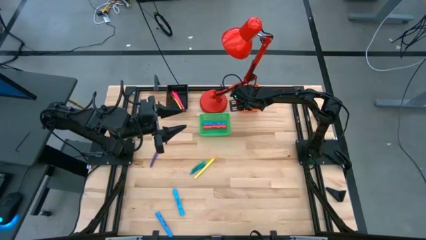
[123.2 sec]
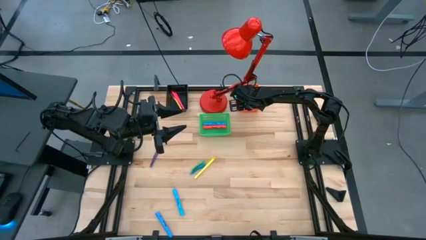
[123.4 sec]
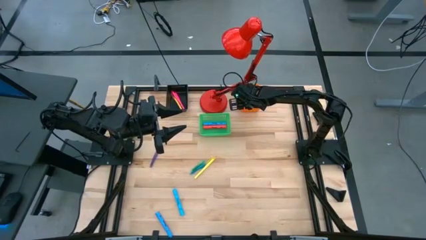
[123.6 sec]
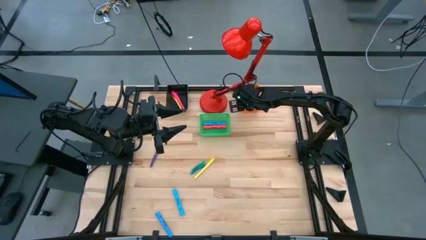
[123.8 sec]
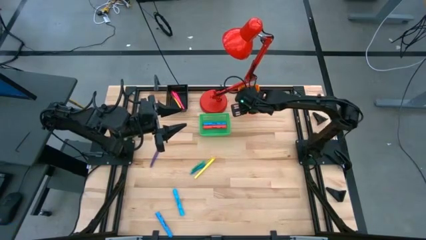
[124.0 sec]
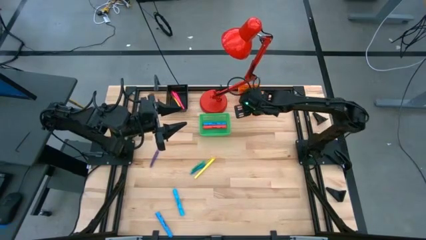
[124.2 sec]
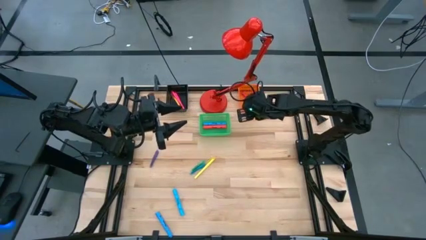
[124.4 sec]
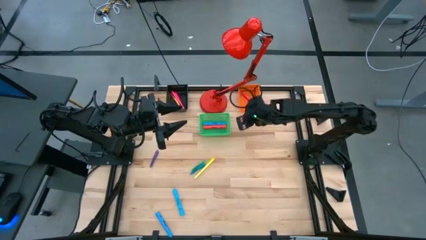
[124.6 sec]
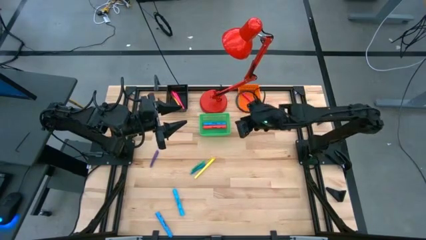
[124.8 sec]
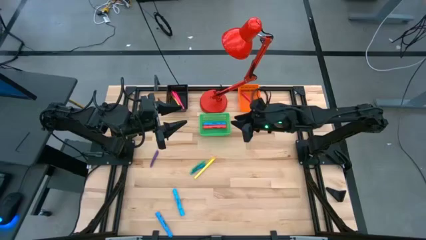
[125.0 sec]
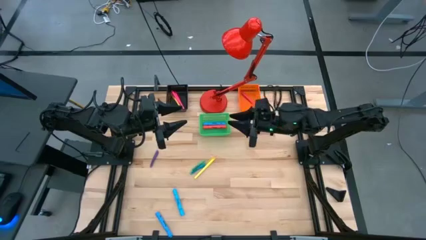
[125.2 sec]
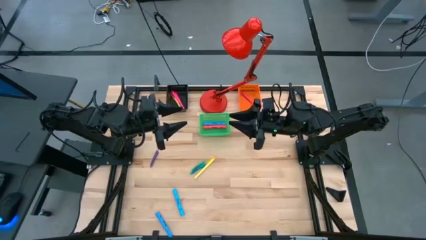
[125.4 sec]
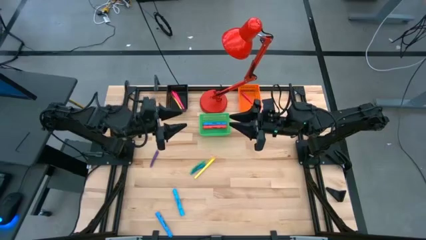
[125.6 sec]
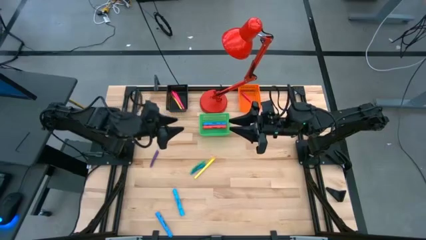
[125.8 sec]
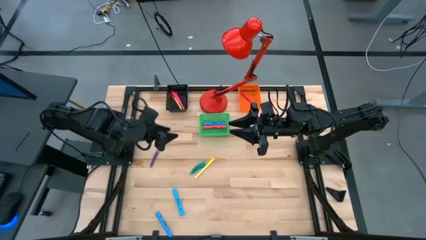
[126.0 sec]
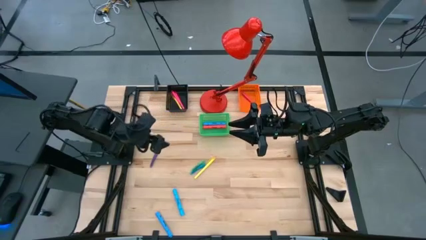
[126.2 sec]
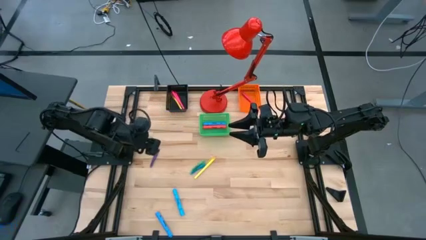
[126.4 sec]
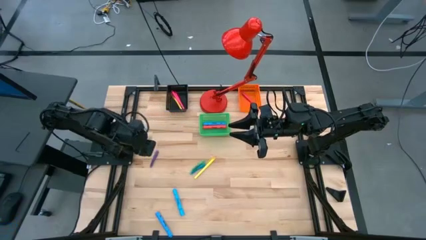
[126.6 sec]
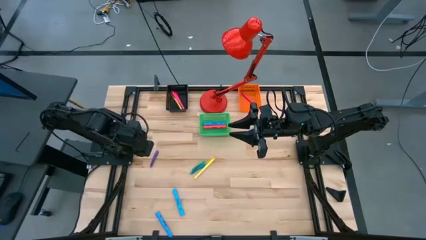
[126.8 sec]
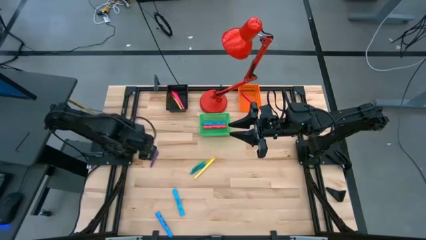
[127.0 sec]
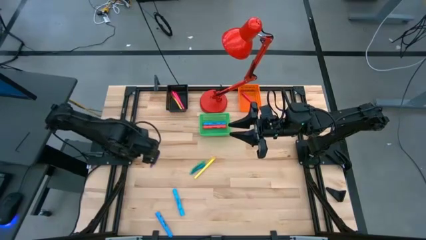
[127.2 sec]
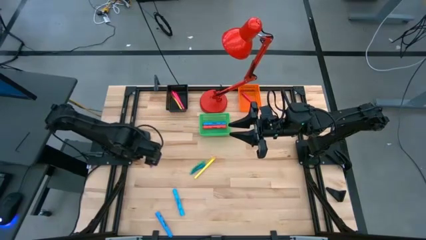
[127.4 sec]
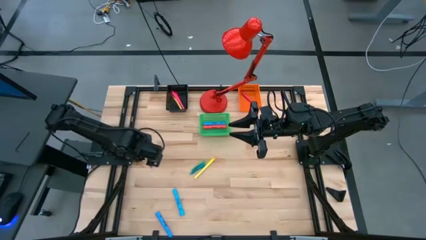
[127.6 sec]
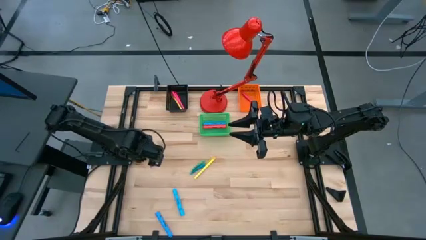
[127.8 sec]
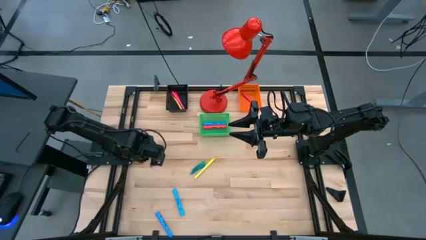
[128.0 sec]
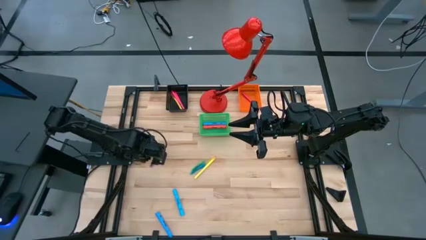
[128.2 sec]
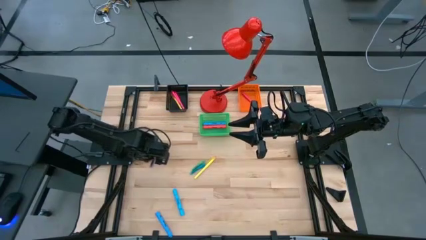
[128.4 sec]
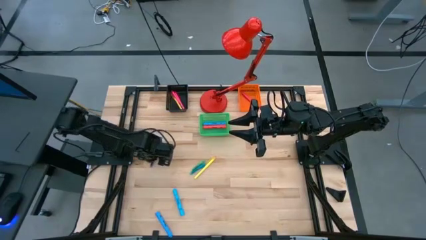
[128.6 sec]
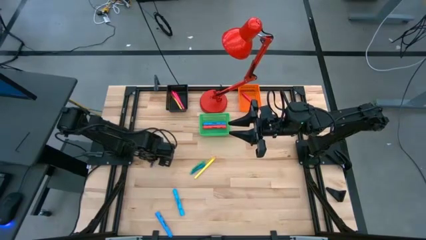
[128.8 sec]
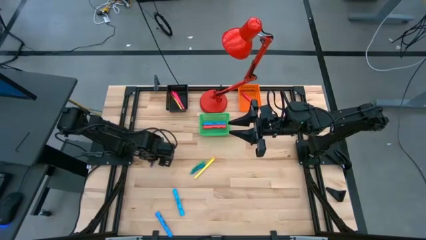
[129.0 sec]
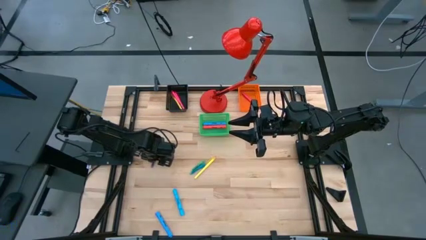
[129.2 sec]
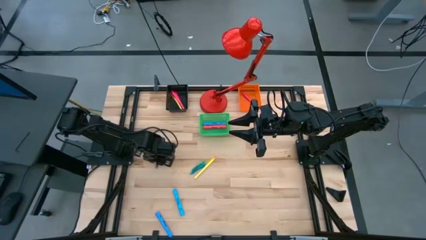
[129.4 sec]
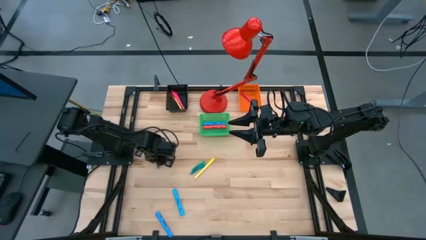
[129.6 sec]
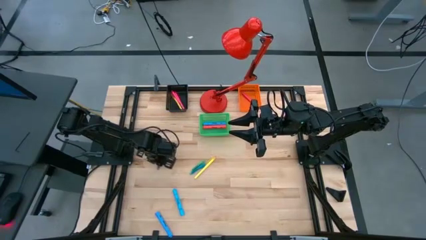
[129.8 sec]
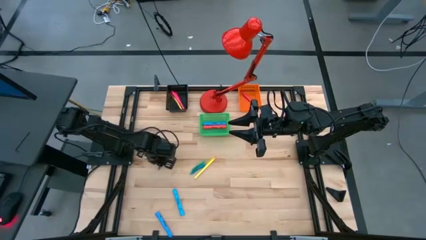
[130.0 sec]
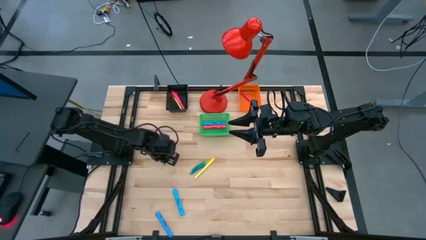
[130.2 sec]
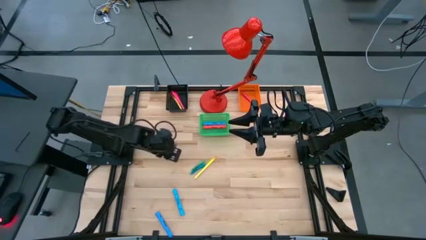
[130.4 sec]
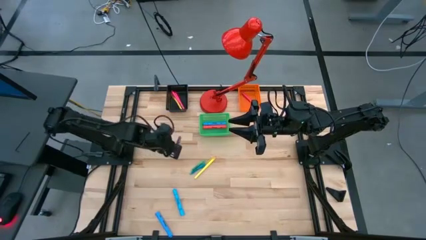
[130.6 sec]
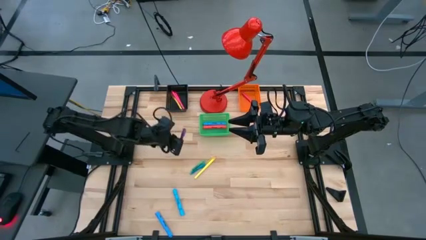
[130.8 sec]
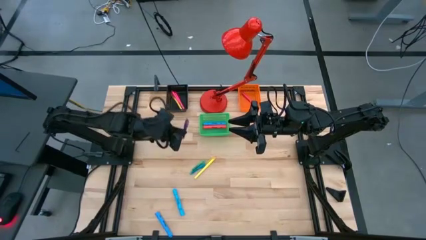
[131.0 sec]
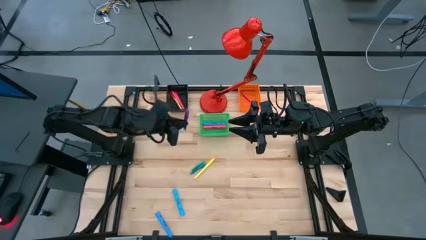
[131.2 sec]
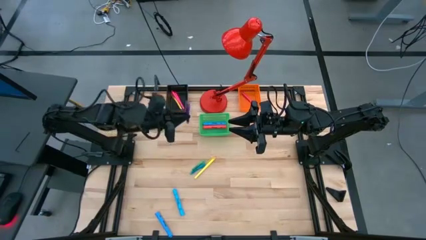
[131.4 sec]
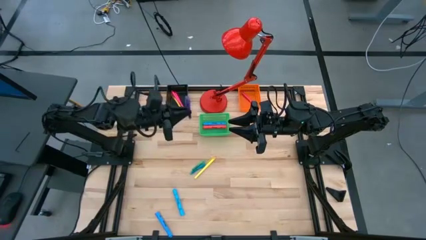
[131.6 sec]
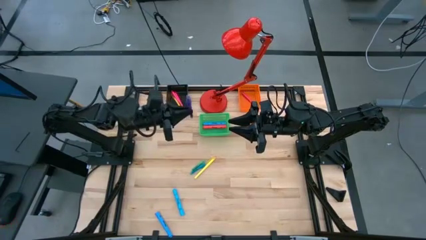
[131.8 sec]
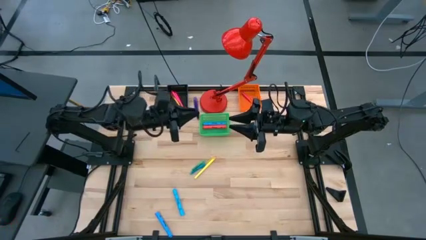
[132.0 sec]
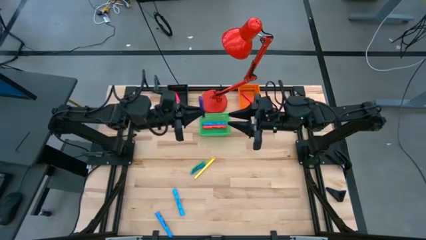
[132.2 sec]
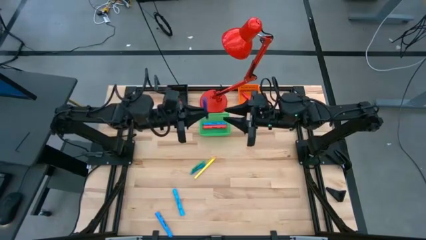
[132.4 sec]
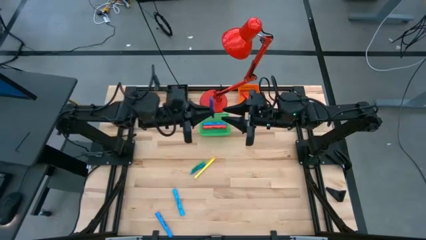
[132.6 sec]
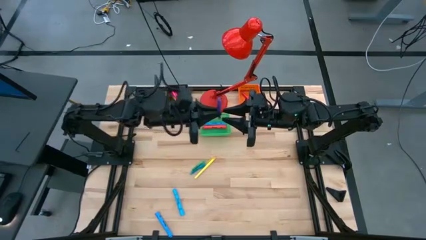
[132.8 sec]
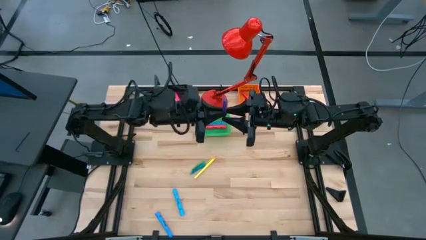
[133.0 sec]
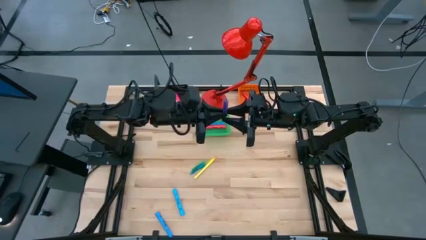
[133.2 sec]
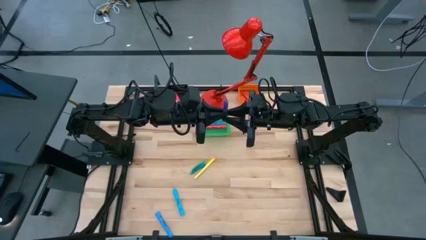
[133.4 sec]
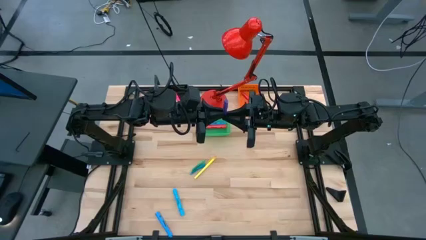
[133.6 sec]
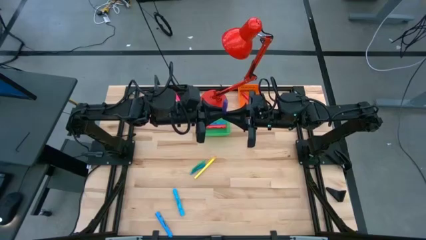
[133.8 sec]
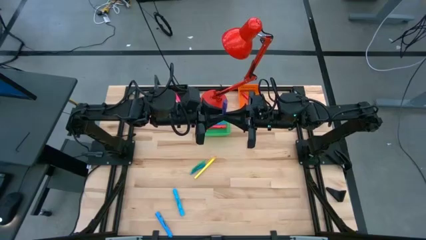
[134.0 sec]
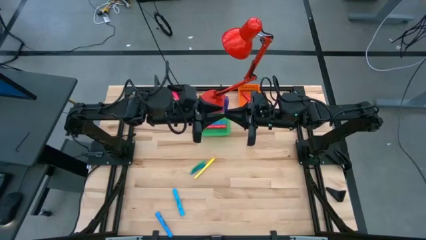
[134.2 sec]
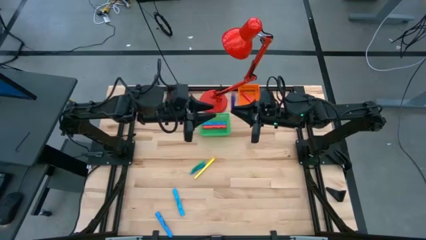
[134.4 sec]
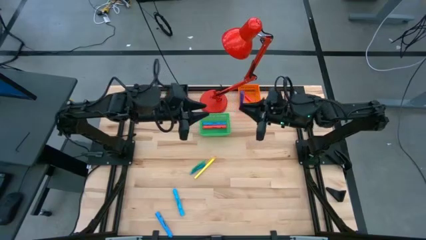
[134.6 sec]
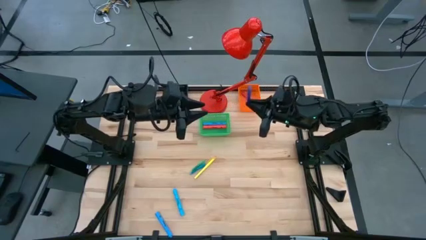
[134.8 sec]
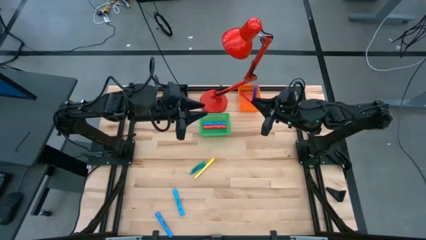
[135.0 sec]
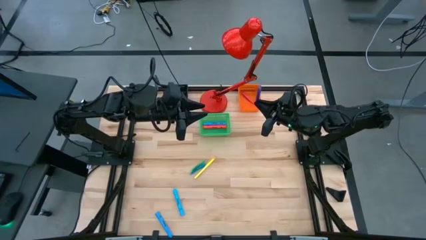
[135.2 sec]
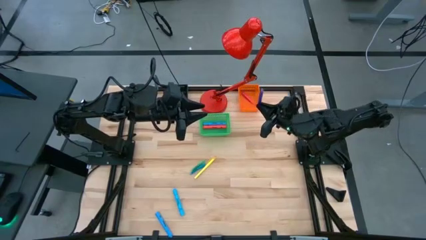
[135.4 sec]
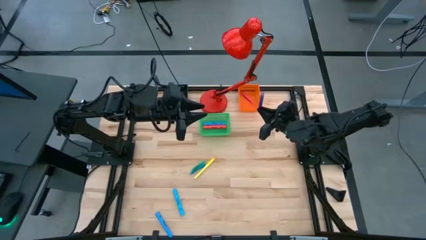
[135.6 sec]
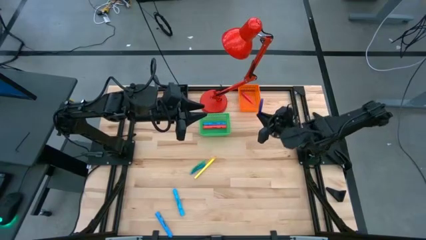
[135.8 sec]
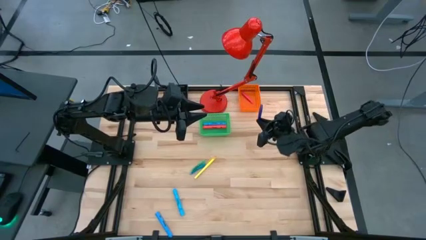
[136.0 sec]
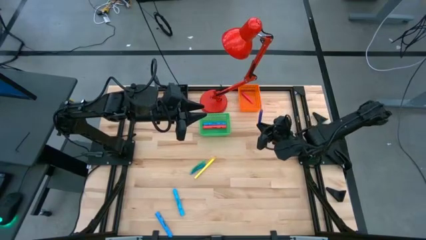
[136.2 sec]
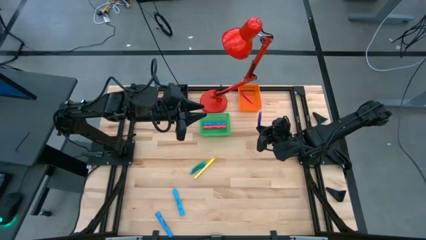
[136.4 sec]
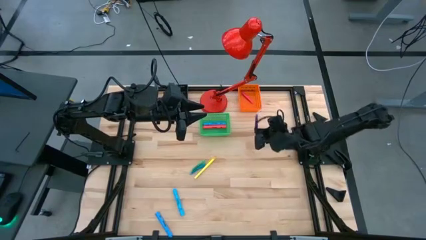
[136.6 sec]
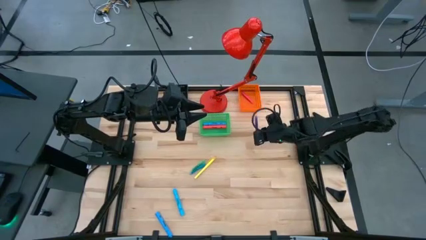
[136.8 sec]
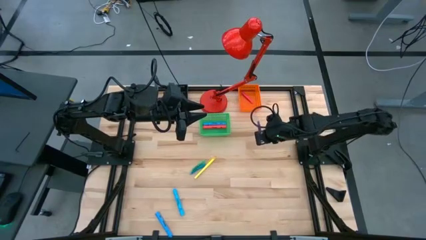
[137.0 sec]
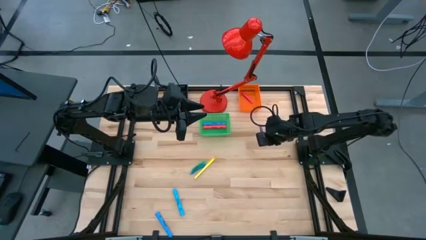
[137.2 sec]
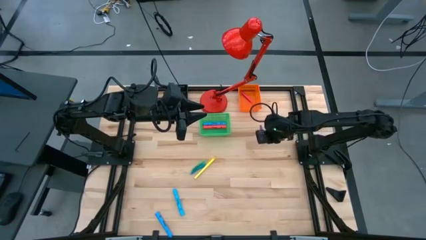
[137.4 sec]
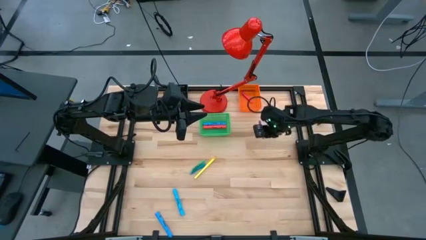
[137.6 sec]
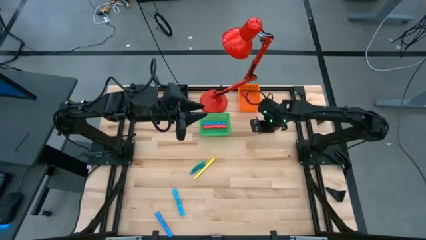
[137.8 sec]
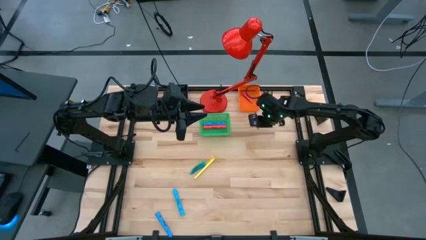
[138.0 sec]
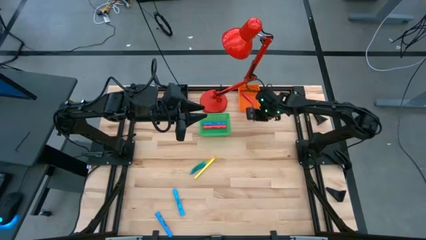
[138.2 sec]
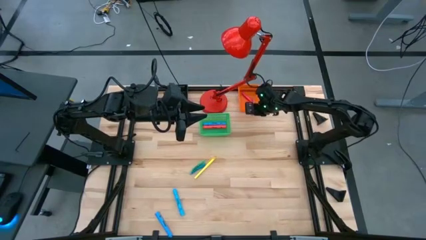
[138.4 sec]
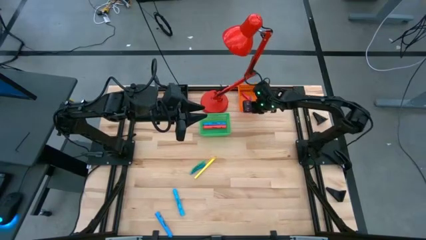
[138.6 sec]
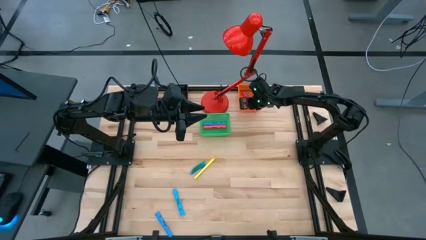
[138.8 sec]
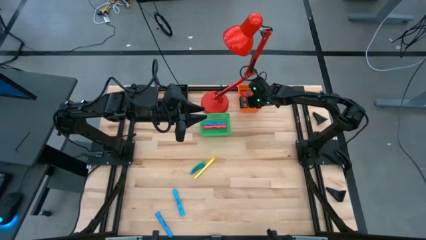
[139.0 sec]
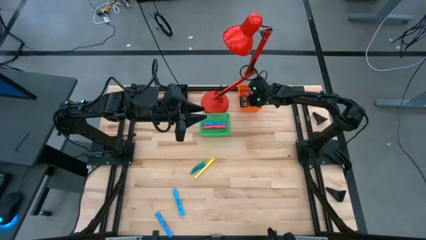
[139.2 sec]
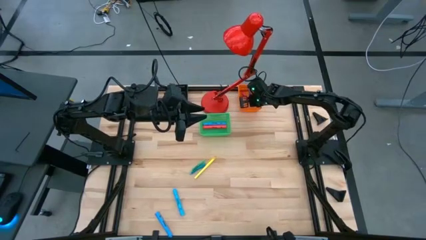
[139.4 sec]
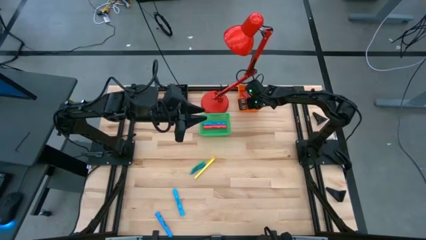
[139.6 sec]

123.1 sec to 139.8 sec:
Task: Pick & Place Markers
Put the small purple highlighter into the orange basket
